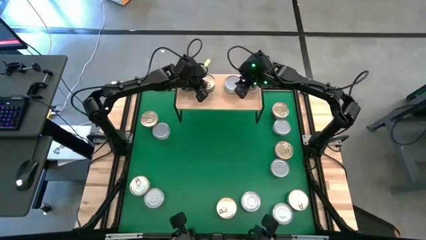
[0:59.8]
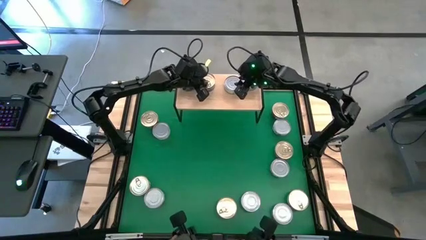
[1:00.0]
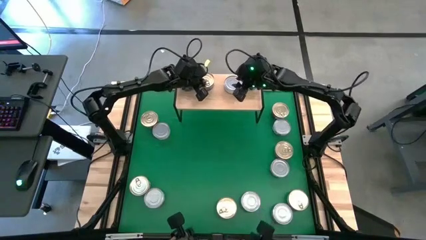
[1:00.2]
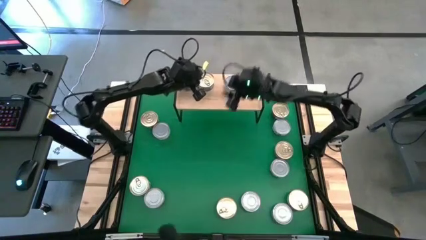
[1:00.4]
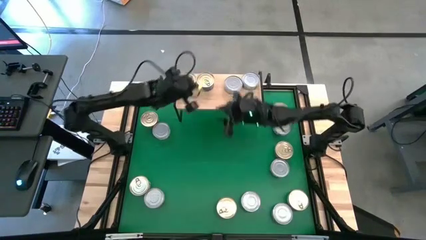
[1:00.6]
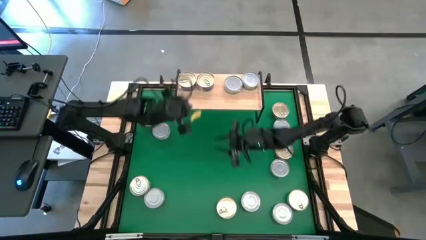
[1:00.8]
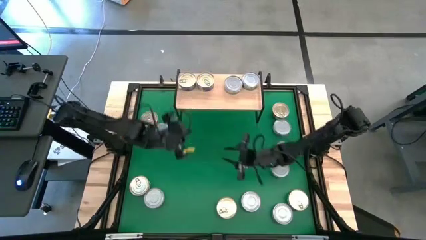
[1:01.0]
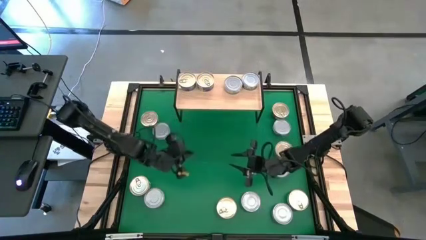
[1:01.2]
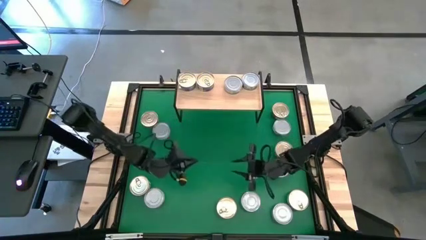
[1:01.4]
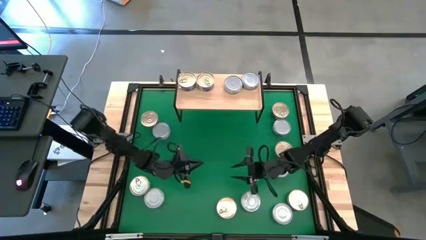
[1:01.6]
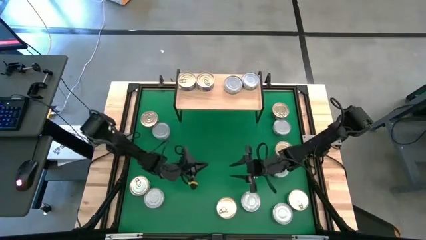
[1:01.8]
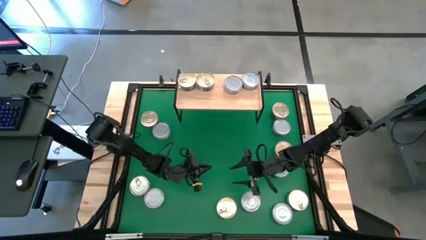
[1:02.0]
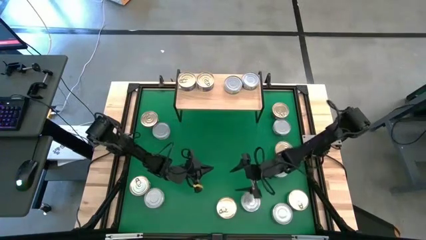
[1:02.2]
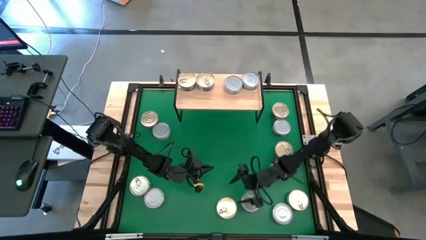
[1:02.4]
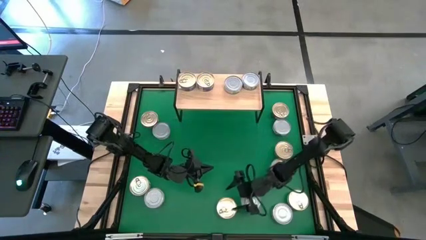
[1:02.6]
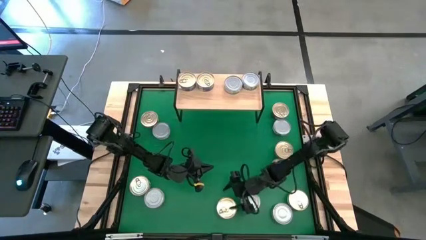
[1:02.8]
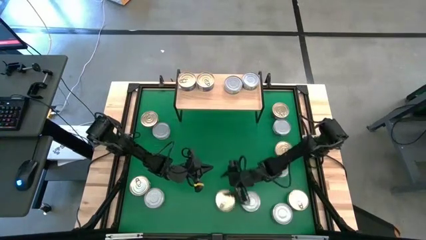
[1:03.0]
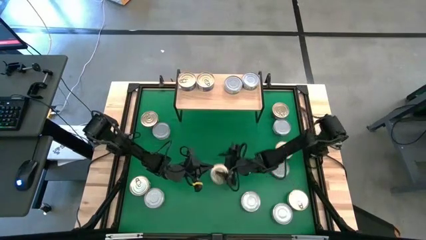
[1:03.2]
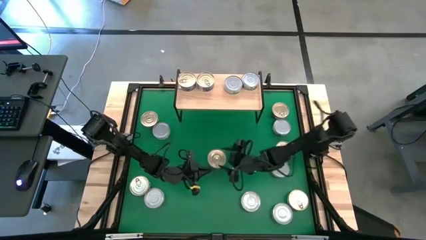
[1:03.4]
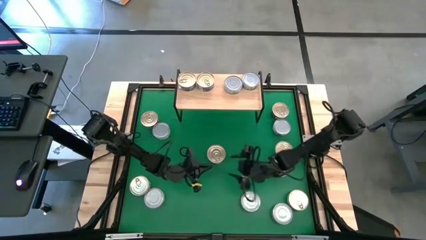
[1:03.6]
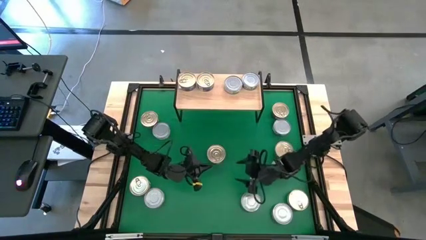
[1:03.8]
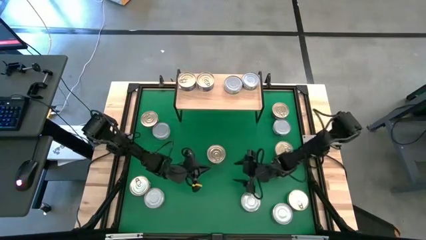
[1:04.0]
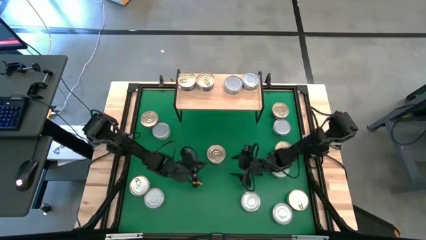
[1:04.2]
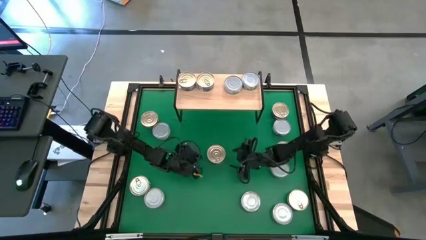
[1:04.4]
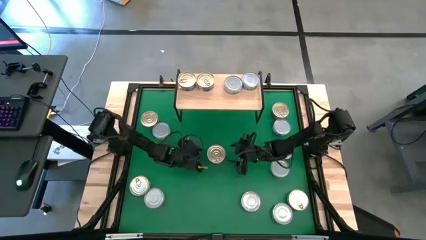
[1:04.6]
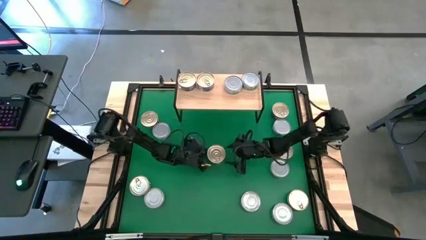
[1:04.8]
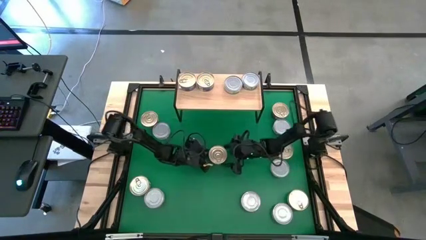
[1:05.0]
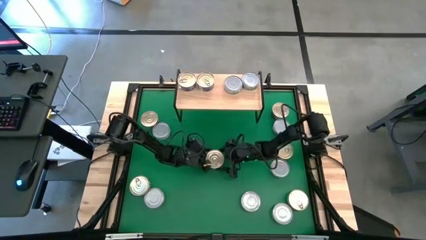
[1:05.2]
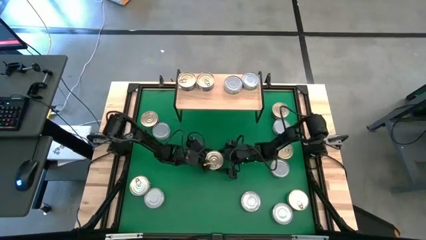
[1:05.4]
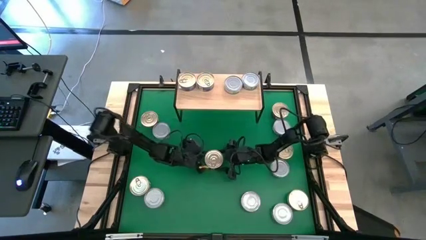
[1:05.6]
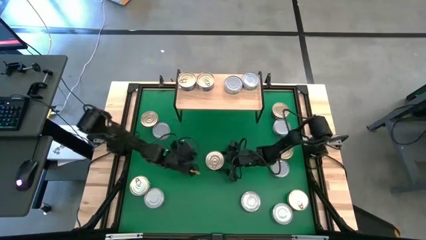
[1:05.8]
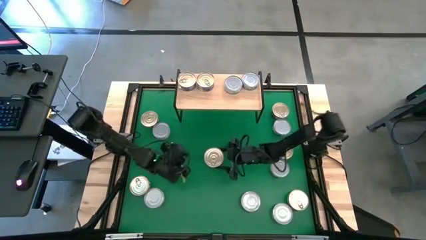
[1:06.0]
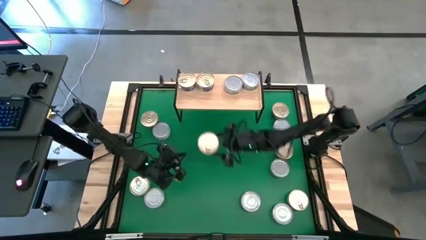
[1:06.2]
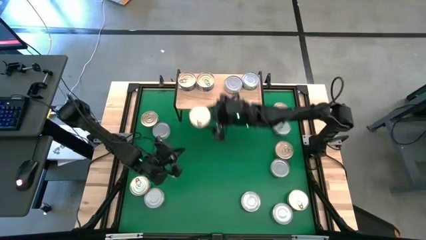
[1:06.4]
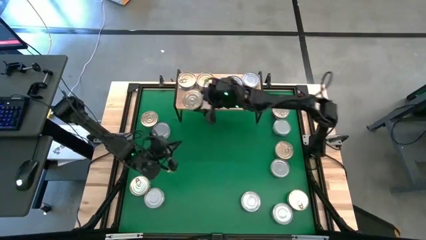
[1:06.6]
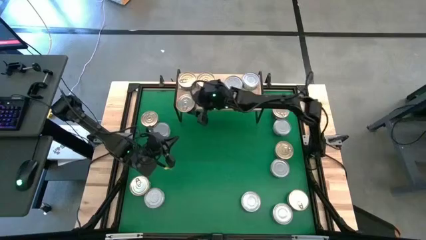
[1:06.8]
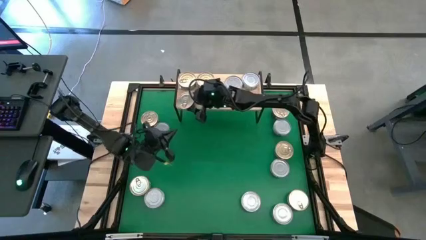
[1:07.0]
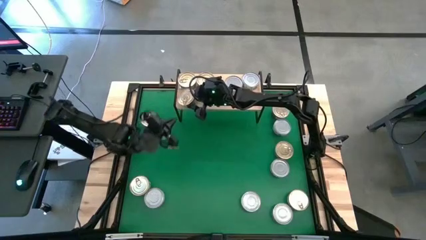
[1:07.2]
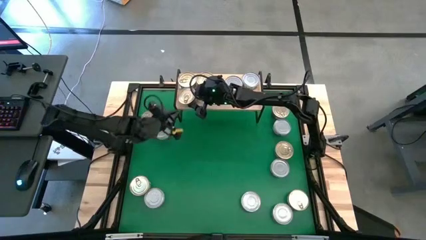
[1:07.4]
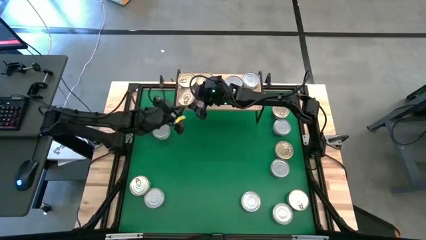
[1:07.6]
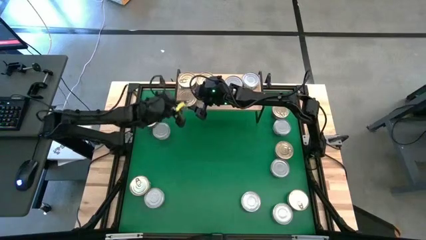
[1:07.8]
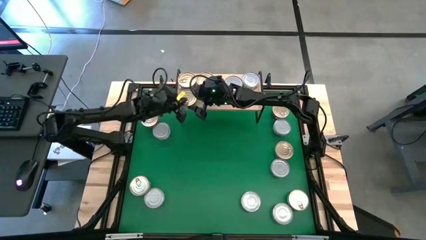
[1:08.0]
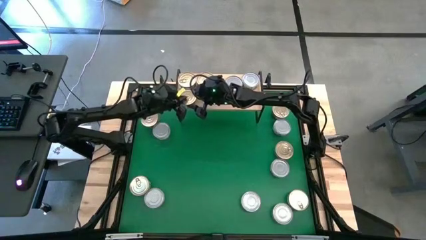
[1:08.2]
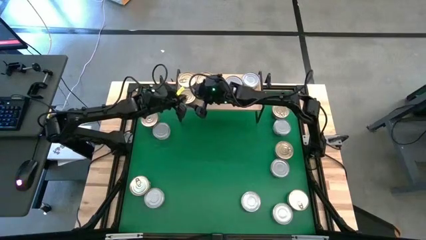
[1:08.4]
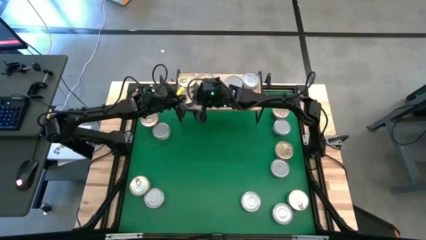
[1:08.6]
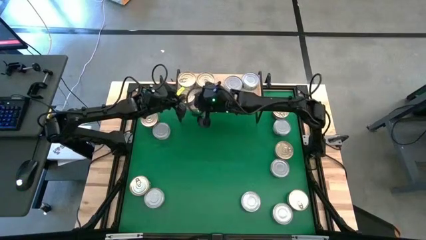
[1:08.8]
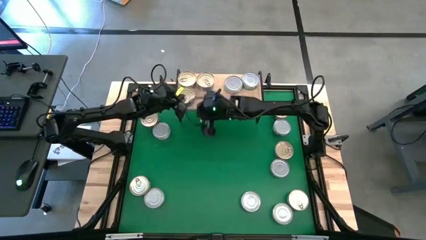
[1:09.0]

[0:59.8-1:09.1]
Task: Stack canned seafood by type on shelf
Put the blue tuna can on the shelf aligned with the other blue tuna can

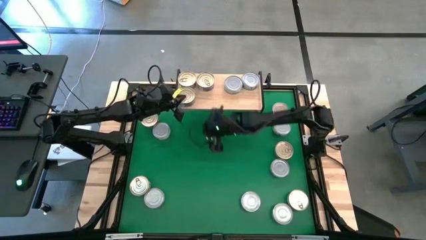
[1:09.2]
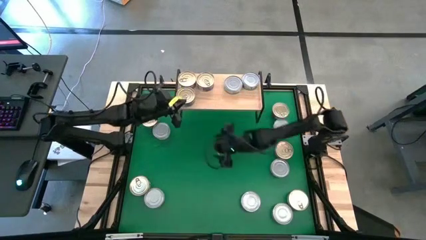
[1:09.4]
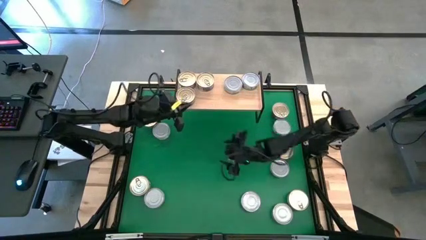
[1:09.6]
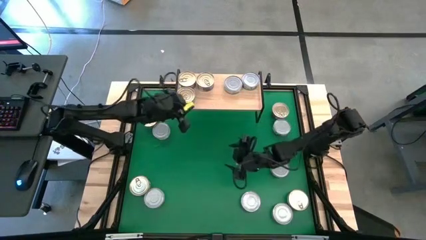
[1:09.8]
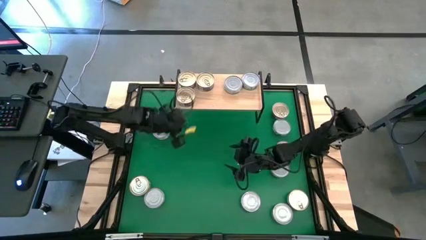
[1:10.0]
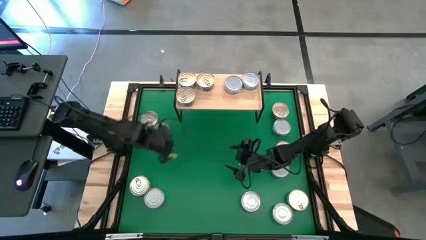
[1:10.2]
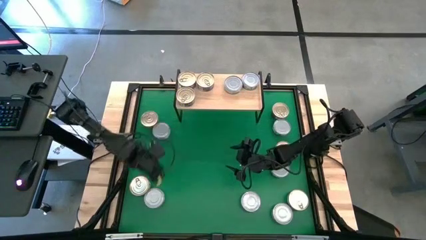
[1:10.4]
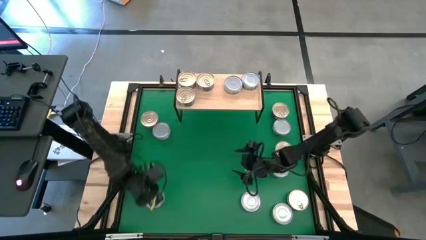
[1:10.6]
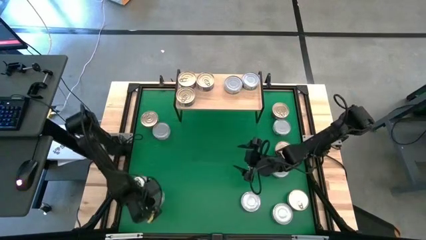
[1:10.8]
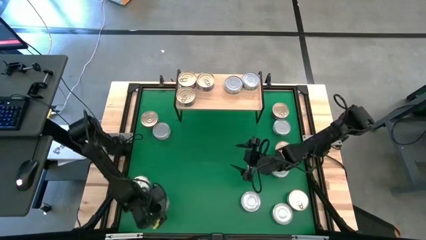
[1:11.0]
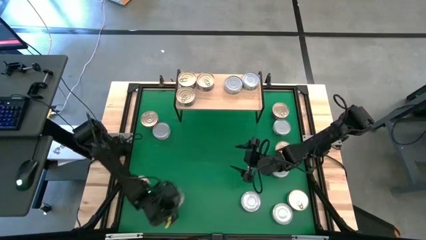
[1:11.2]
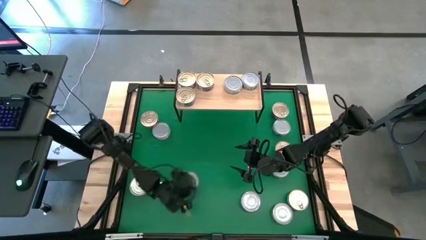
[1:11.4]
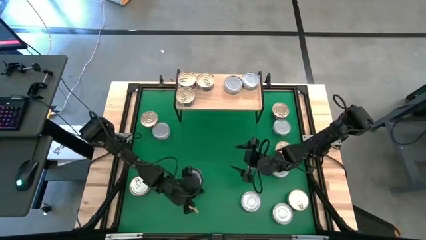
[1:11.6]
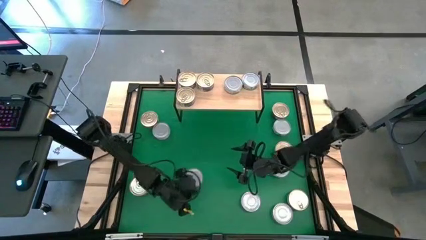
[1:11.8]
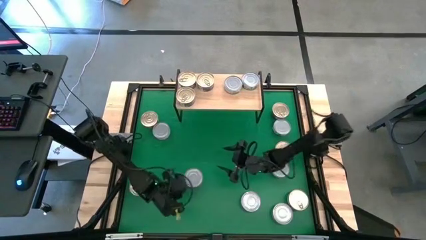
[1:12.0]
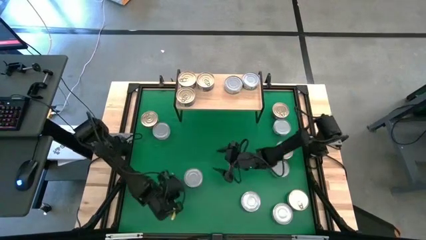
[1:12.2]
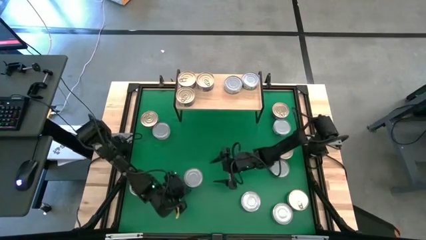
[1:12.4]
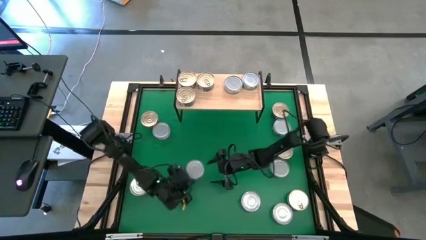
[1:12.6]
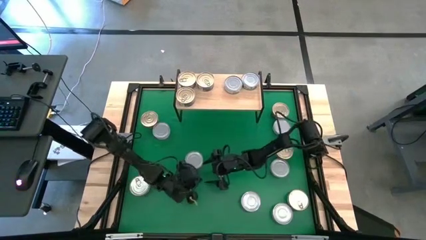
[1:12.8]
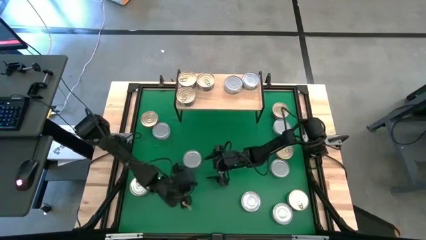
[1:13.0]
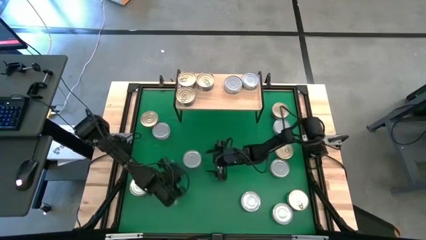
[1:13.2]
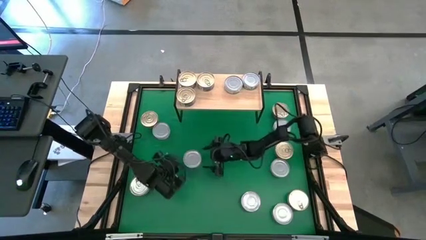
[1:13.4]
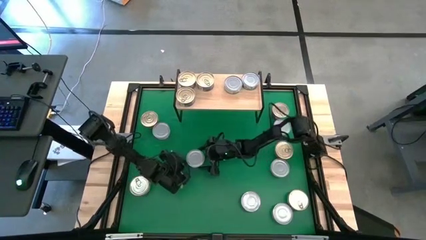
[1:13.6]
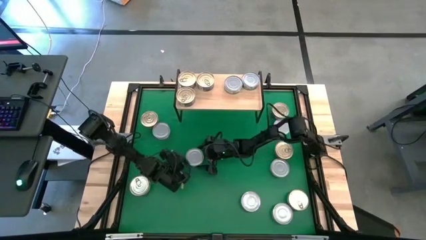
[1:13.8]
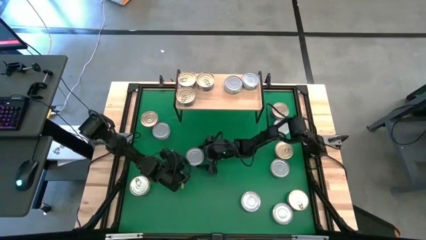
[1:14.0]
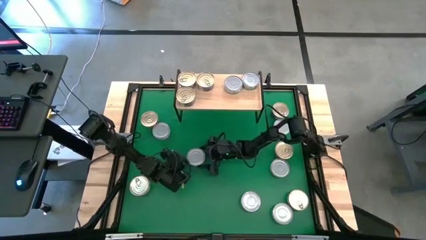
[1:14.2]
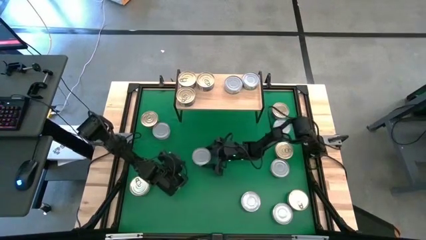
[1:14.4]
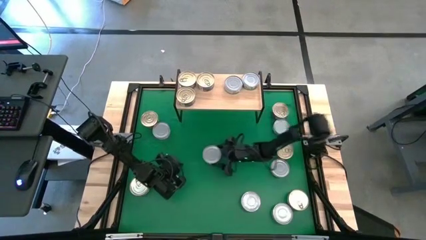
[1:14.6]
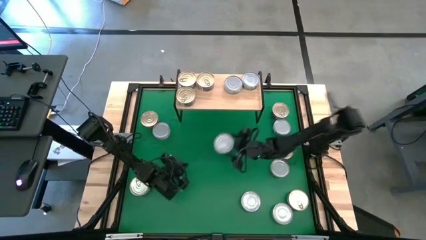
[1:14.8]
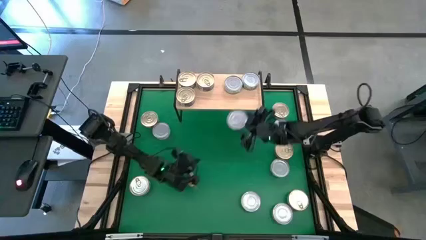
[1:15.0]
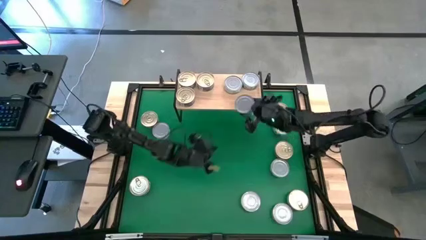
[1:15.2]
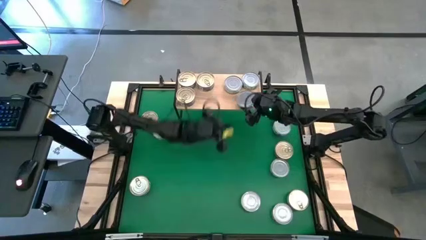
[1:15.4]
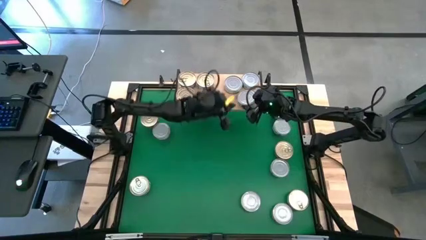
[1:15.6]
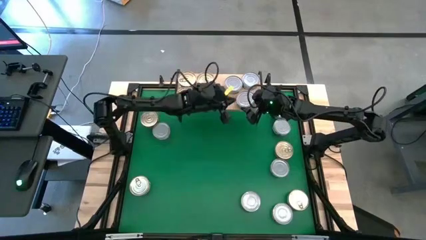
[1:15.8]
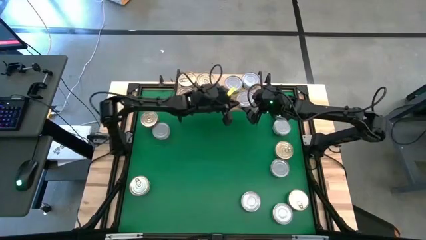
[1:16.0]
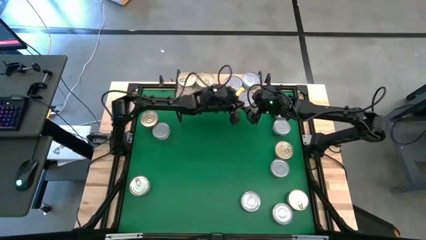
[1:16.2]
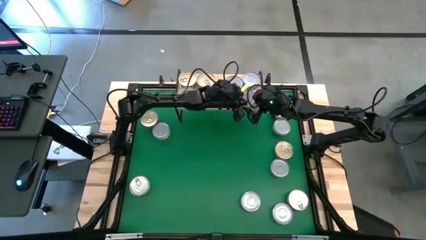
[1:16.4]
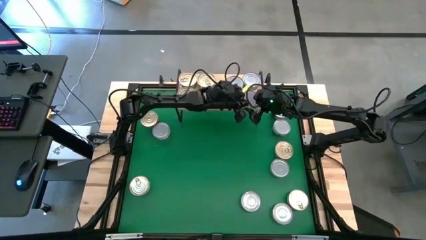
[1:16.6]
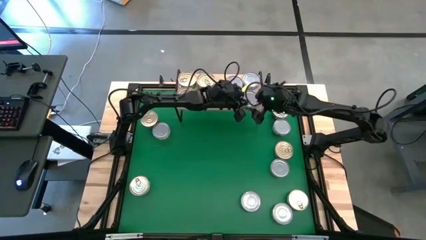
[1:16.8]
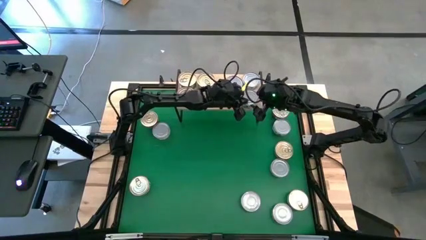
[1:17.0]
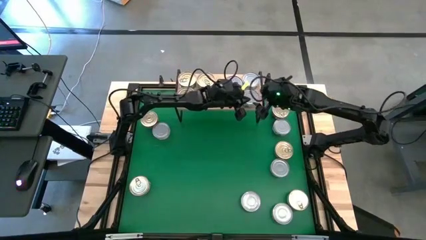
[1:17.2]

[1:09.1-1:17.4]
Put the green tuna can on the shelf aligned with the other green tuna can
